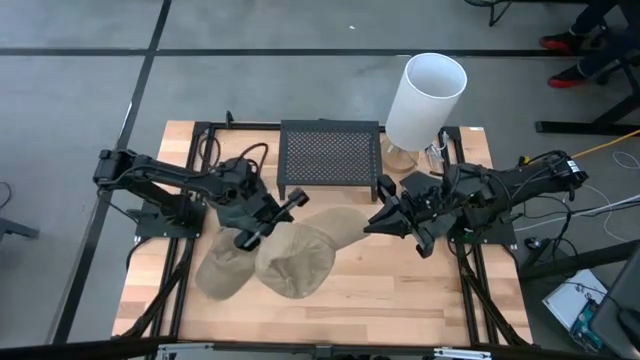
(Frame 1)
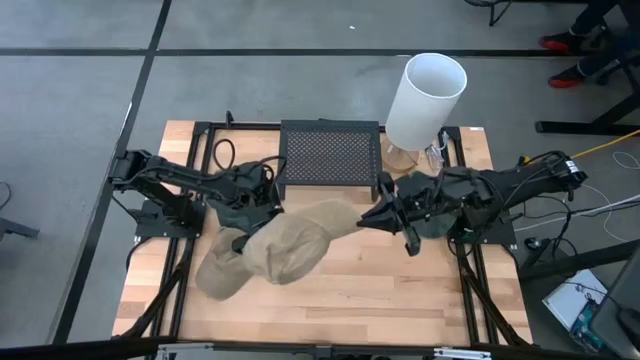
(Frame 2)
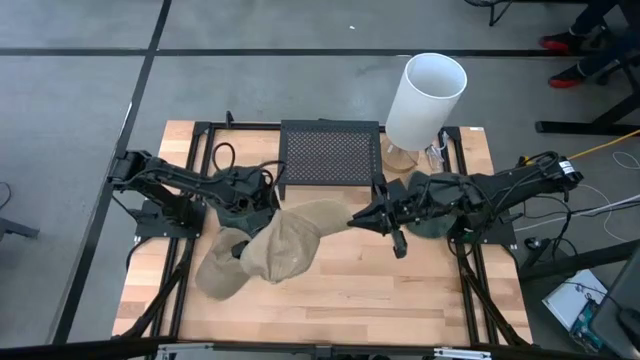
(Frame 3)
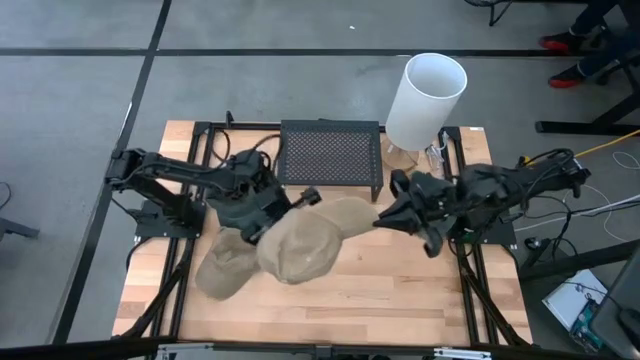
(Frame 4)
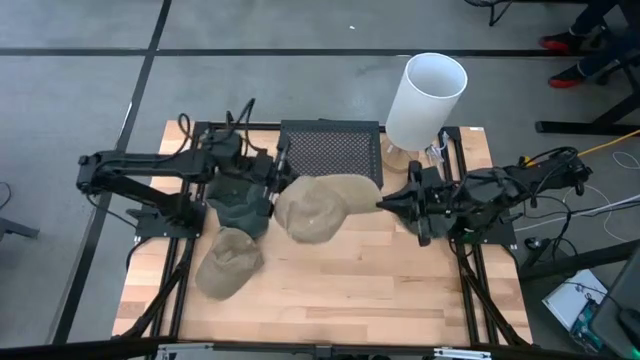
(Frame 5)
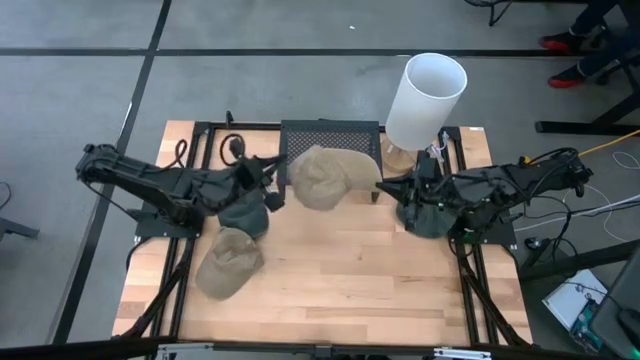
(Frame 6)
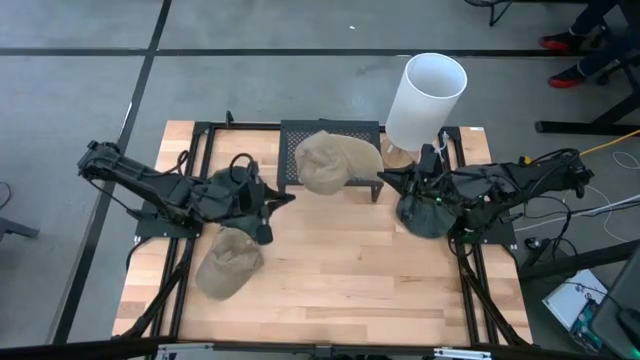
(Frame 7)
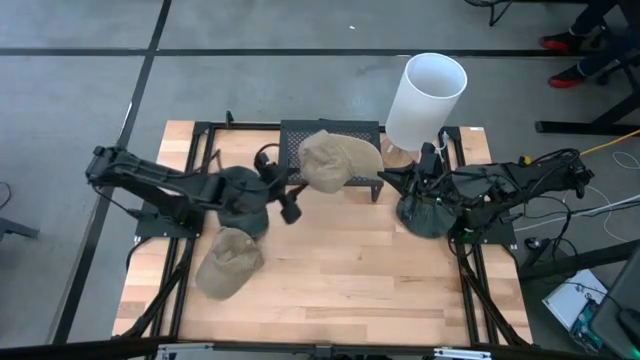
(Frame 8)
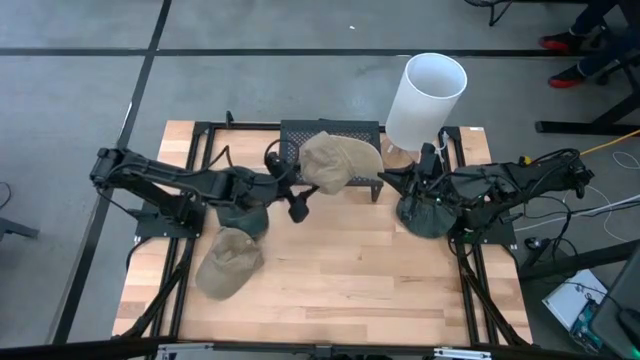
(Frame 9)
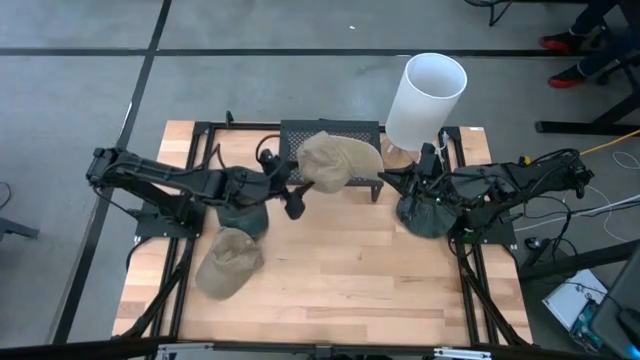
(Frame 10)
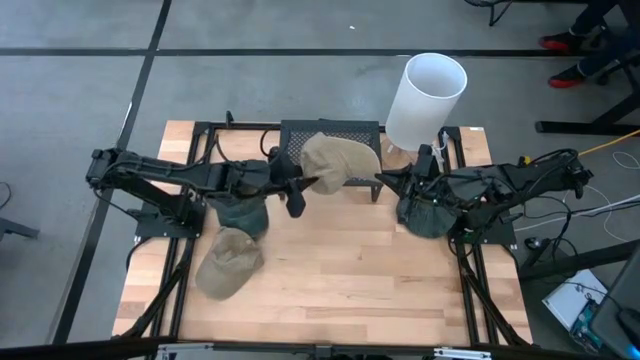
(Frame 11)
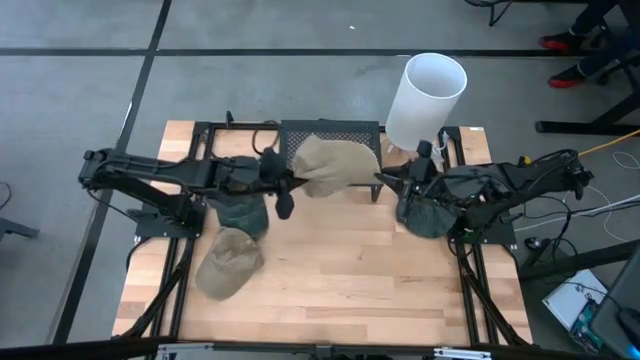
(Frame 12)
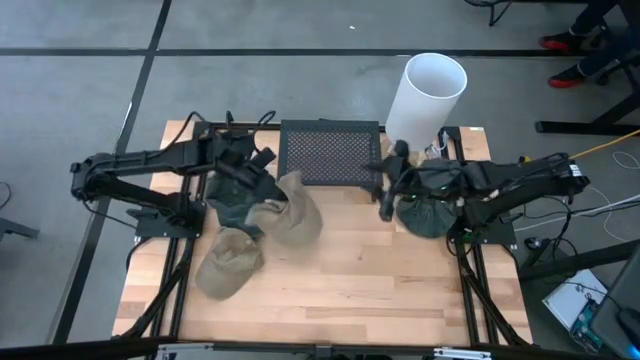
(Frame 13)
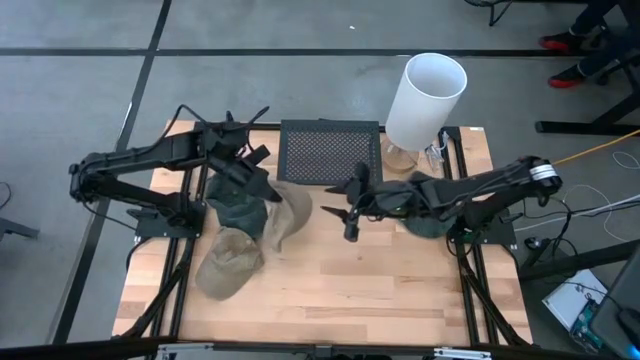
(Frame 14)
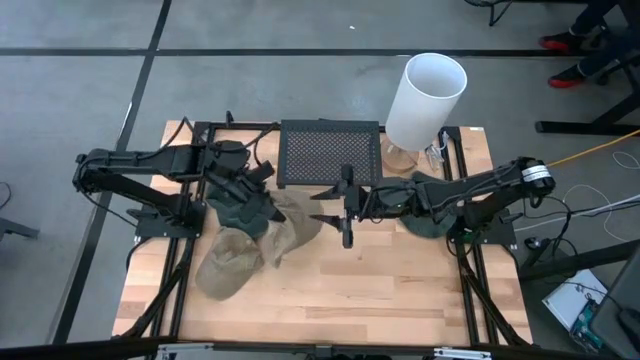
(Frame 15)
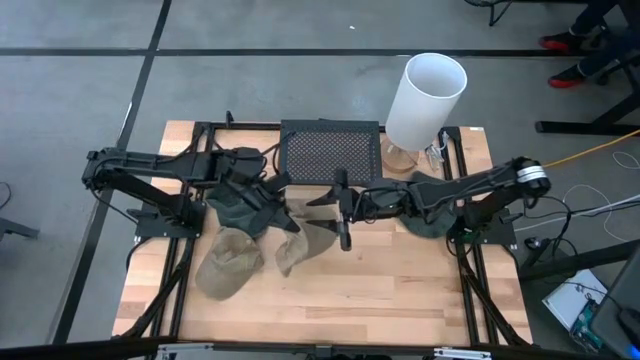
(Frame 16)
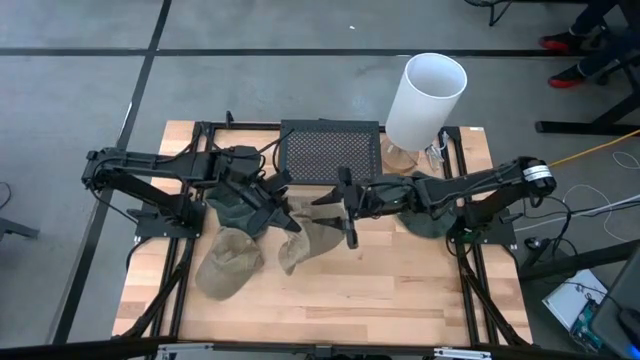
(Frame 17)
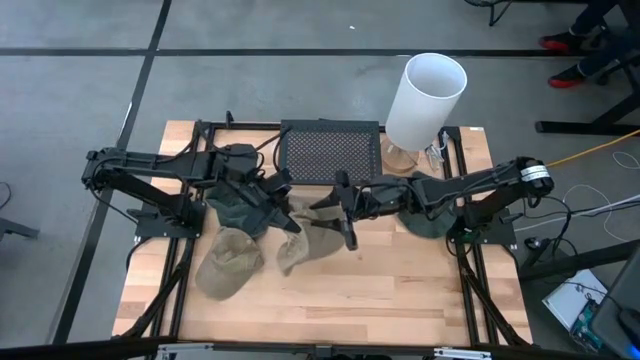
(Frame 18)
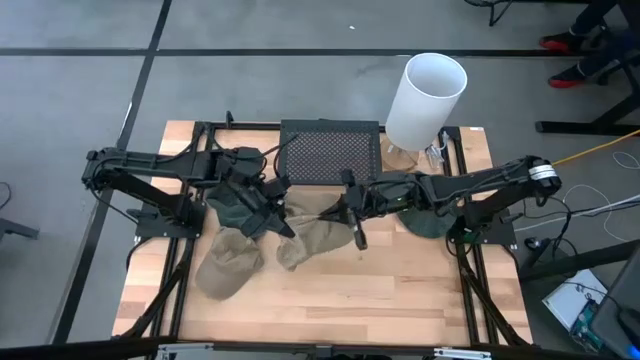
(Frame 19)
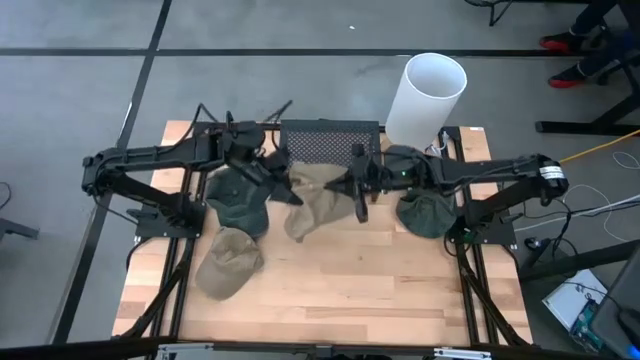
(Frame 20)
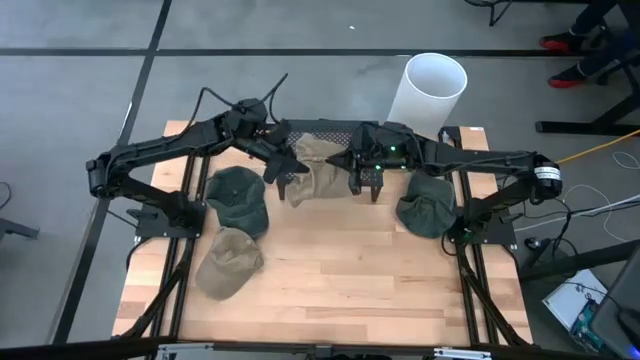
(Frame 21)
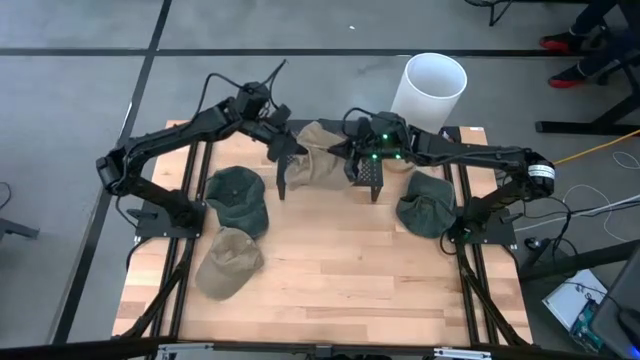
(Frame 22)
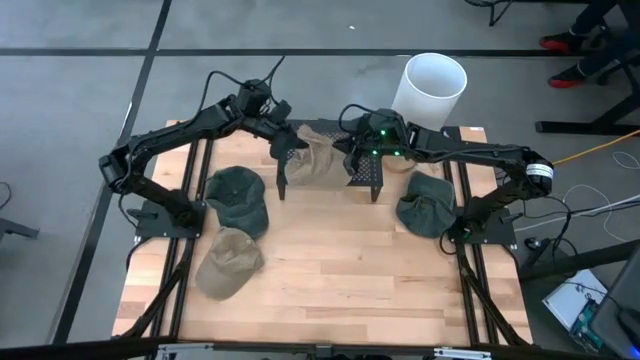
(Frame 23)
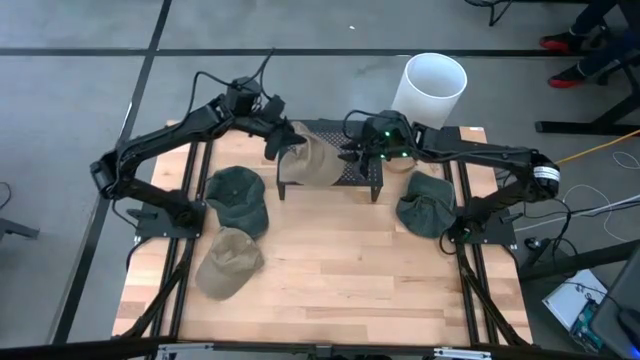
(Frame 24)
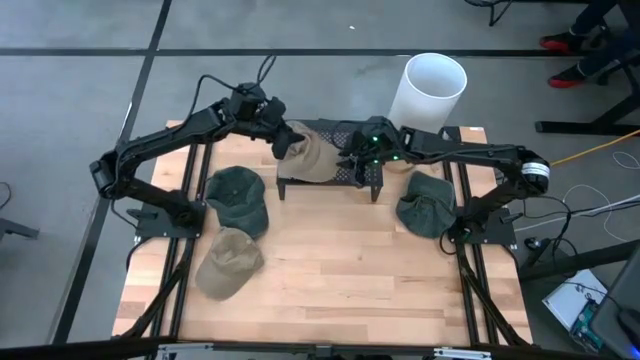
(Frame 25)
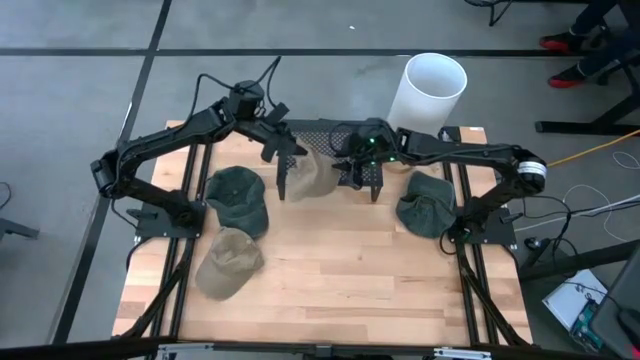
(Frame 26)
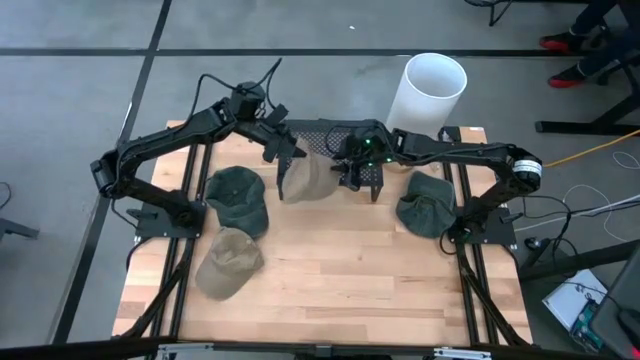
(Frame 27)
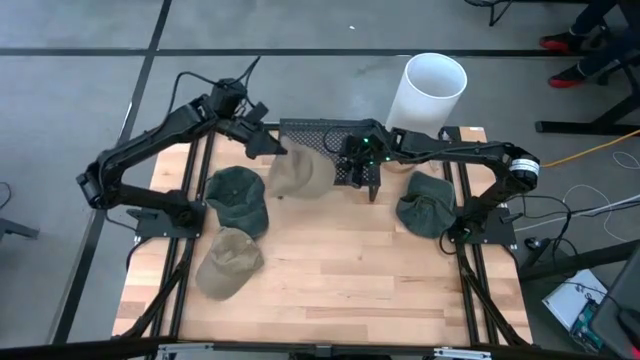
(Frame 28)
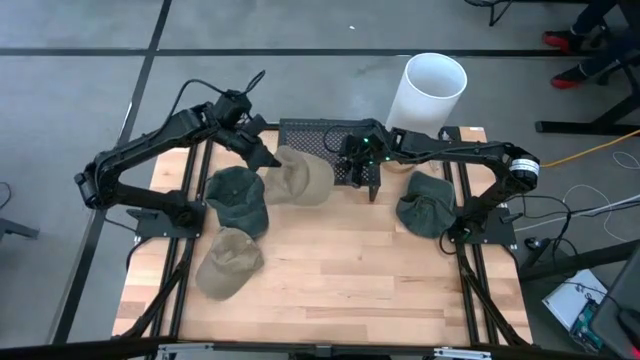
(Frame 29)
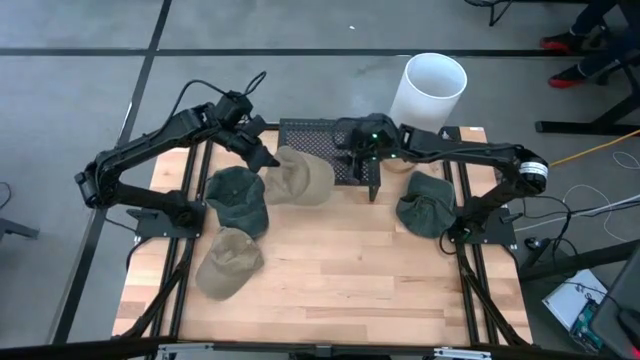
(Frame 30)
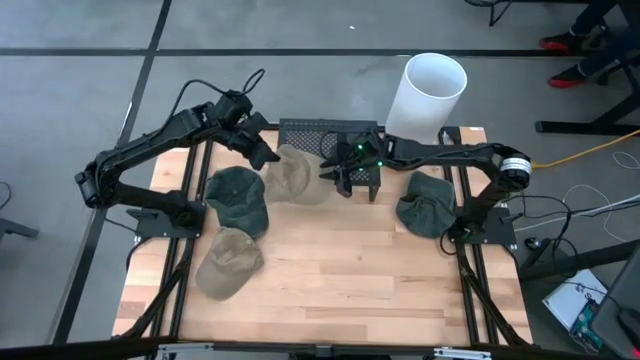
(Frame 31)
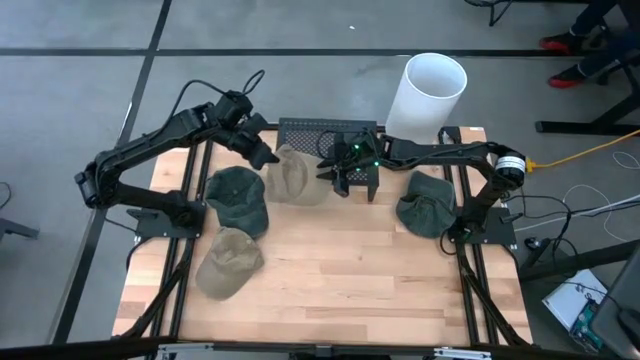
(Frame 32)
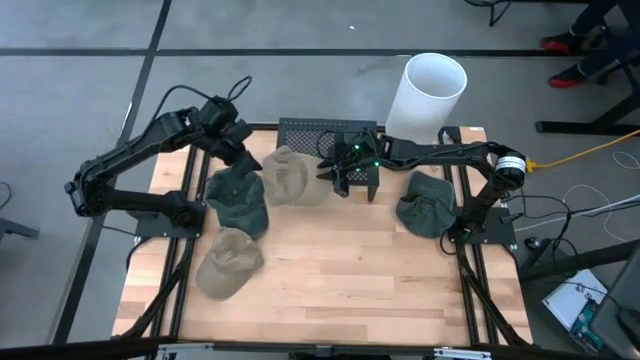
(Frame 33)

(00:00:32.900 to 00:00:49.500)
Task: Pick & Place hat
Put the right brown cap on the shelf

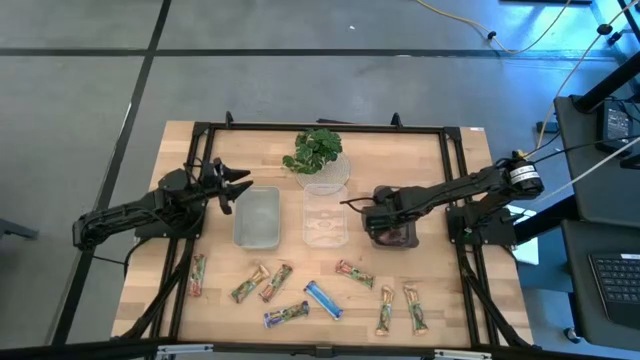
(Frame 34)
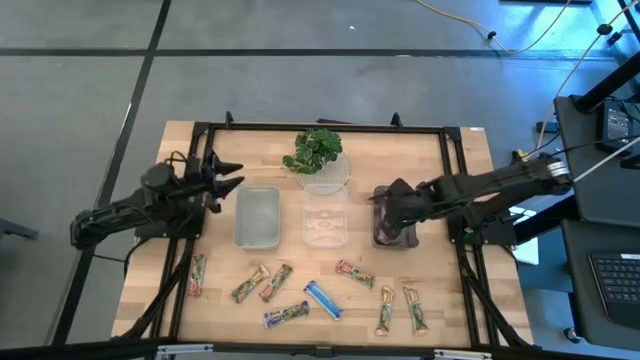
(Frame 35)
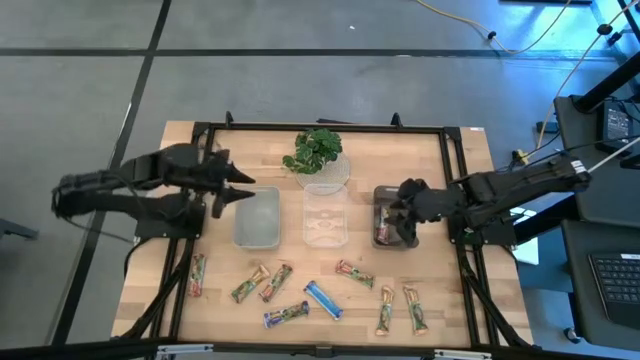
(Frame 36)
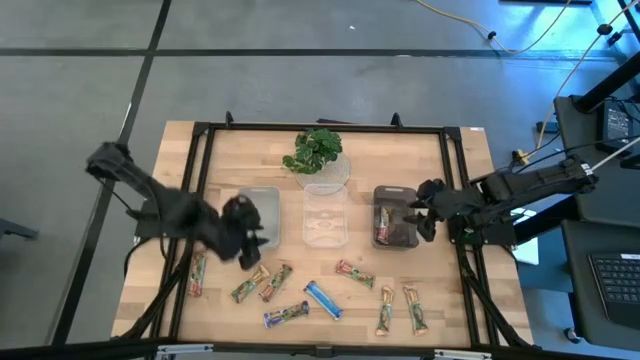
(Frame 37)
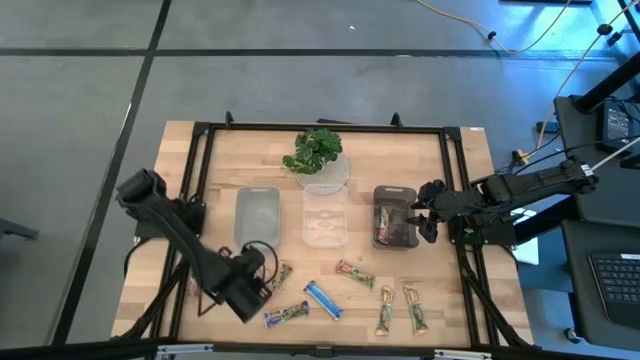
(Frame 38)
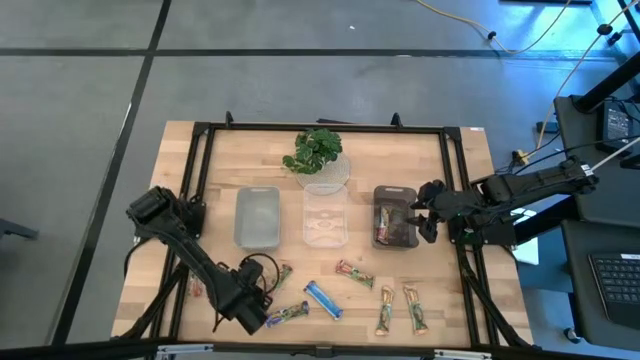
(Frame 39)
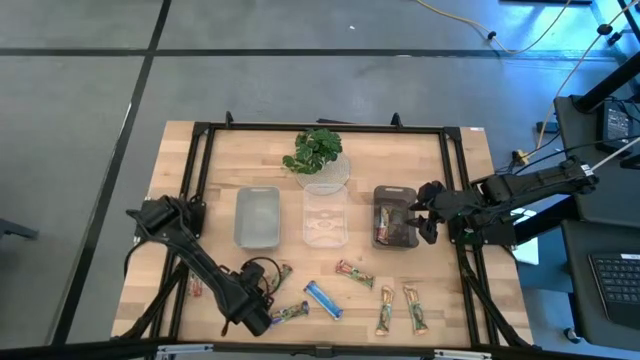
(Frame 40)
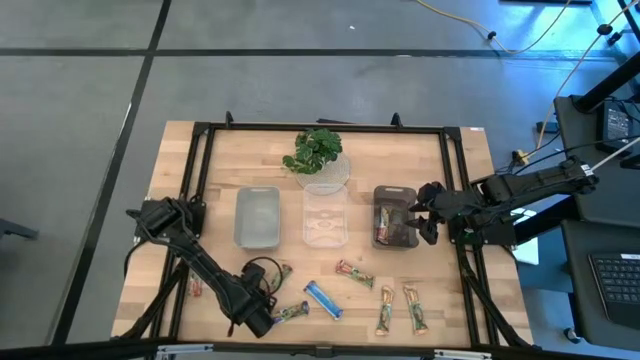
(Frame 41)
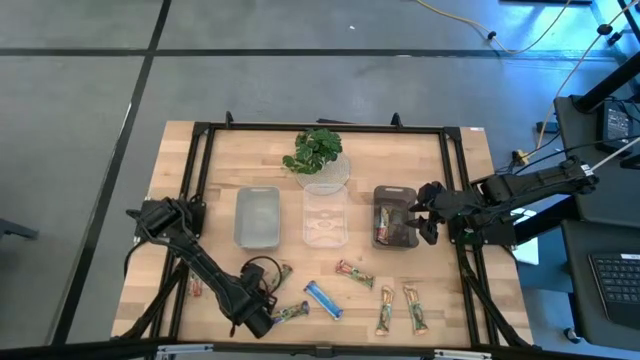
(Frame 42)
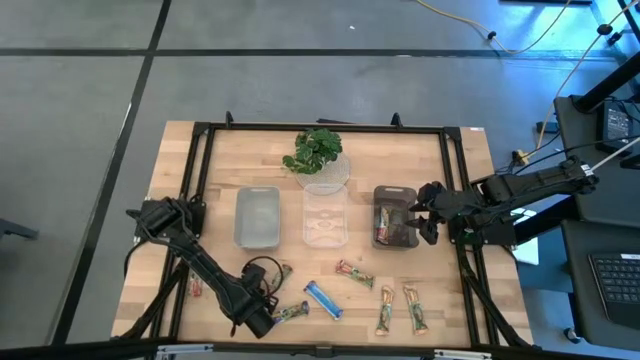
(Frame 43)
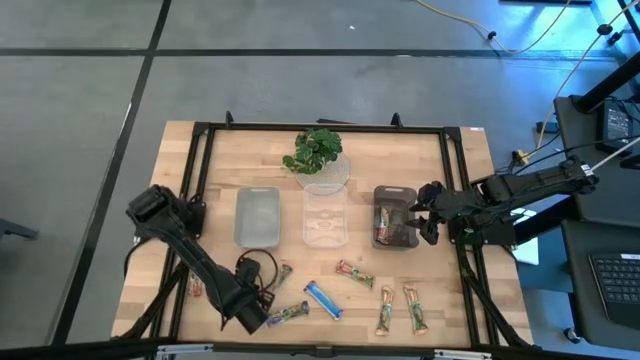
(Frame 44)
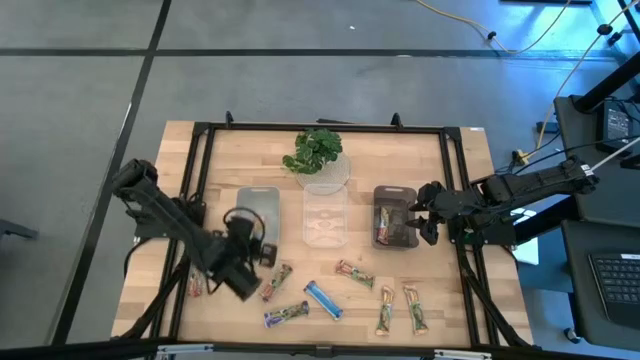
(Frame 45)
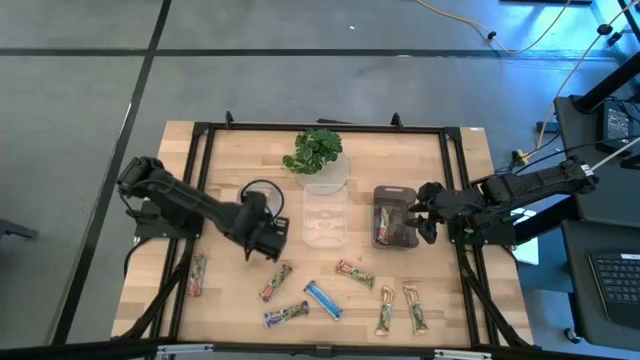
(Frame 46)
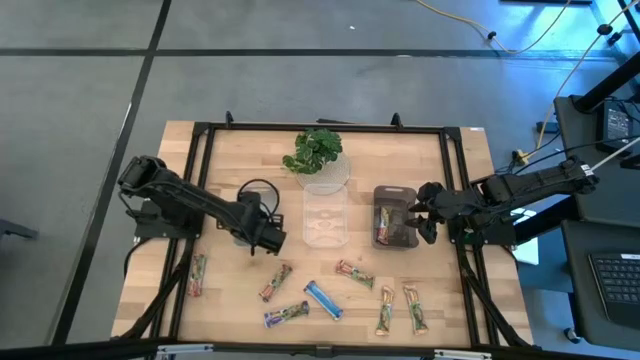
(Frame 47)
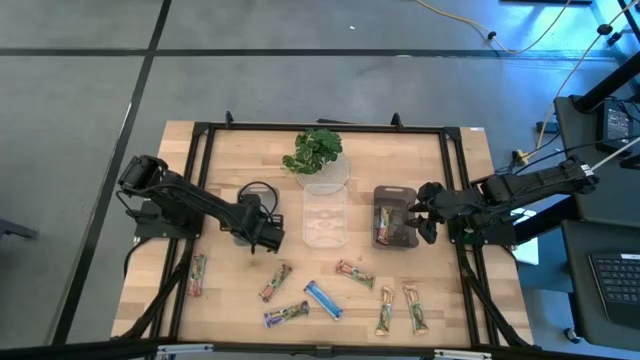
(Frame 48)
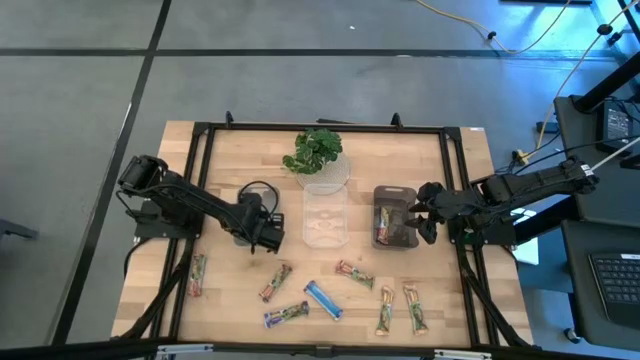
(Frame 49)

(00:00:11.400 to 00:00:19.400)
Task: Pick and place Granola Bars by type
Put the left yellow granola bar into the gray bin
